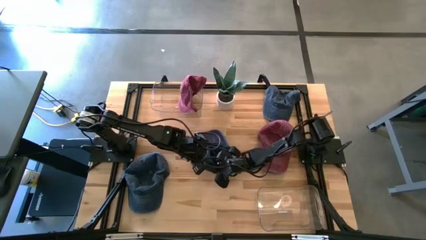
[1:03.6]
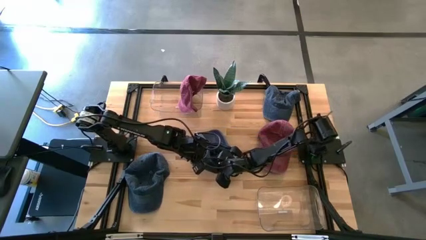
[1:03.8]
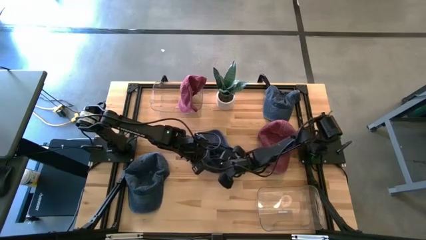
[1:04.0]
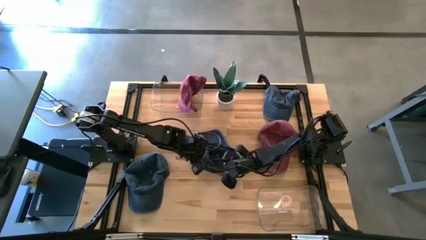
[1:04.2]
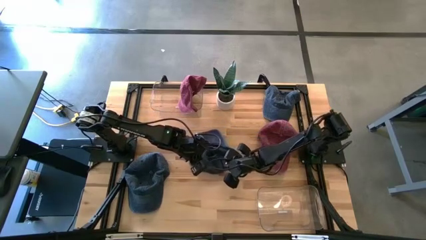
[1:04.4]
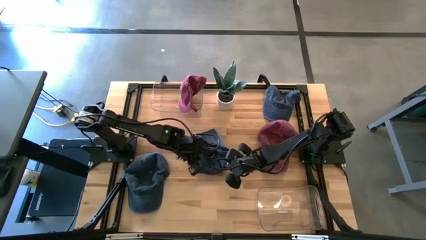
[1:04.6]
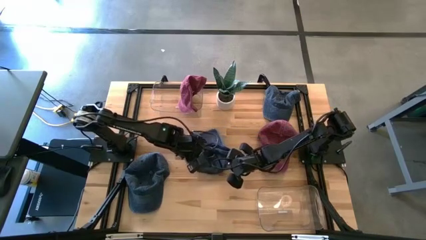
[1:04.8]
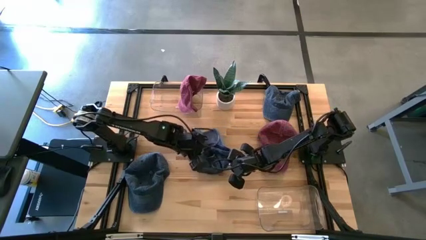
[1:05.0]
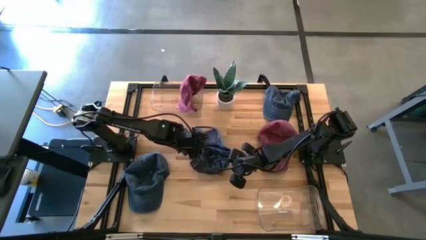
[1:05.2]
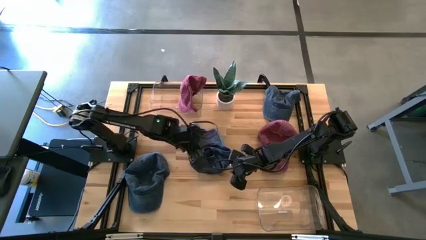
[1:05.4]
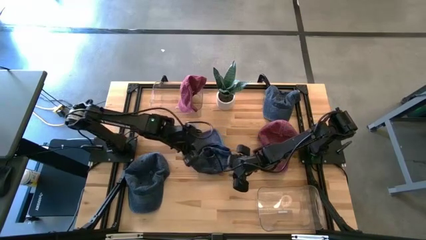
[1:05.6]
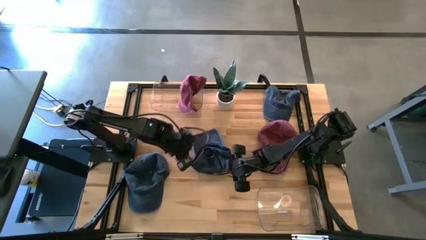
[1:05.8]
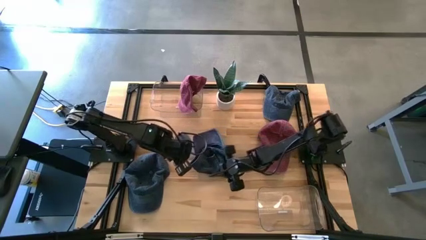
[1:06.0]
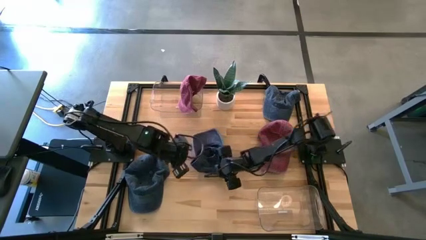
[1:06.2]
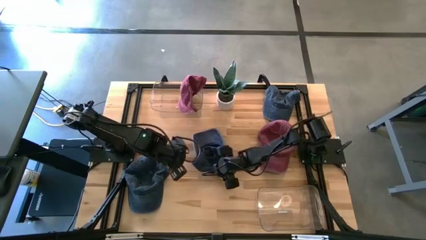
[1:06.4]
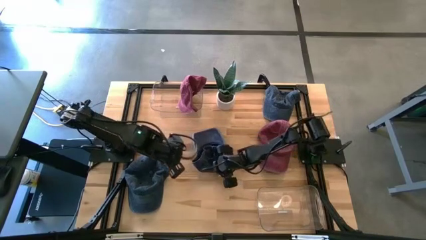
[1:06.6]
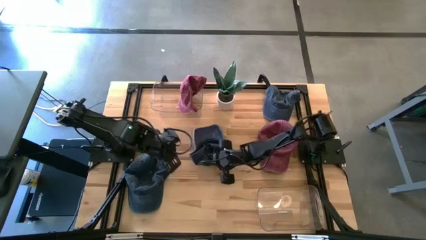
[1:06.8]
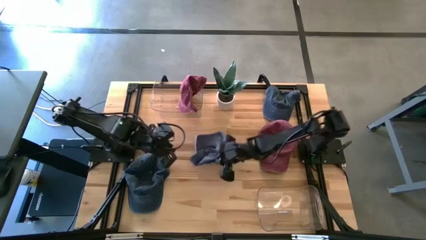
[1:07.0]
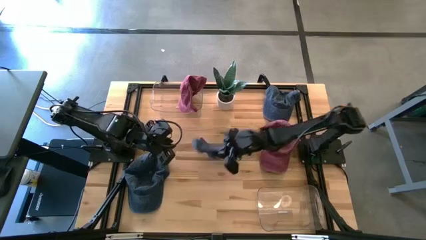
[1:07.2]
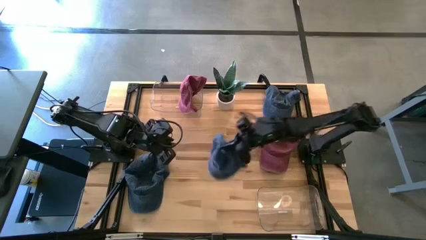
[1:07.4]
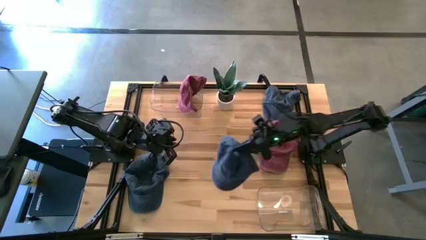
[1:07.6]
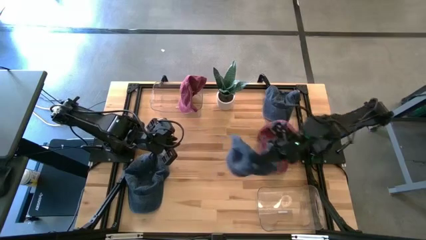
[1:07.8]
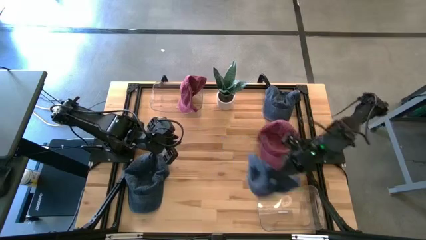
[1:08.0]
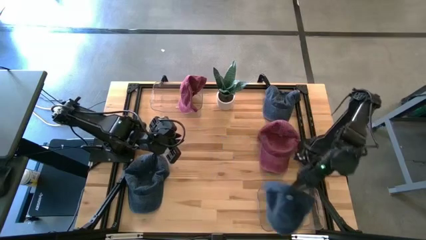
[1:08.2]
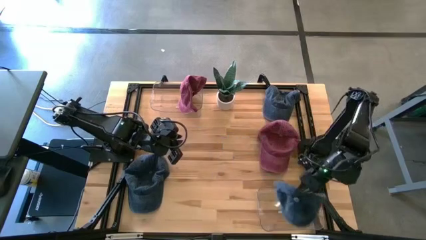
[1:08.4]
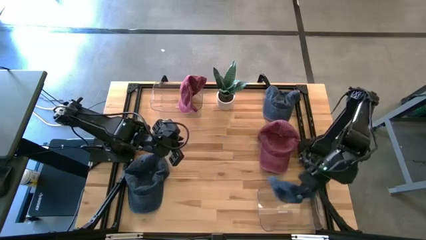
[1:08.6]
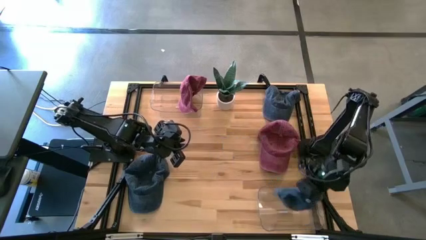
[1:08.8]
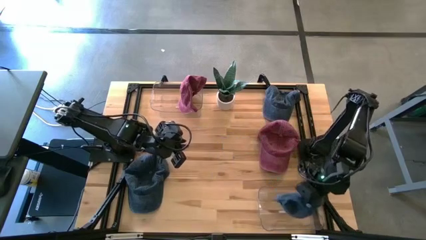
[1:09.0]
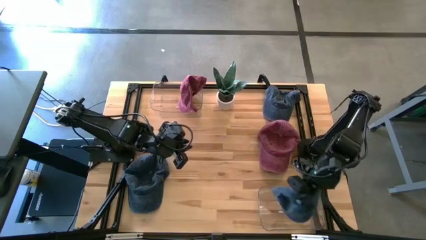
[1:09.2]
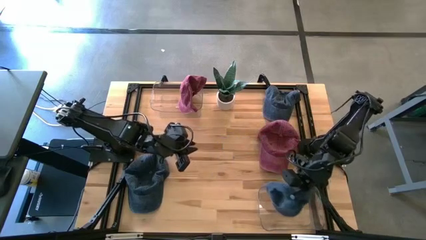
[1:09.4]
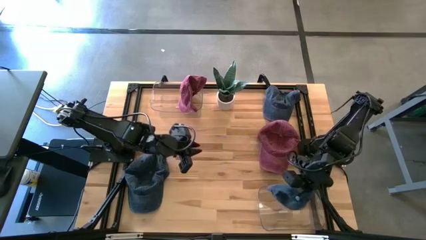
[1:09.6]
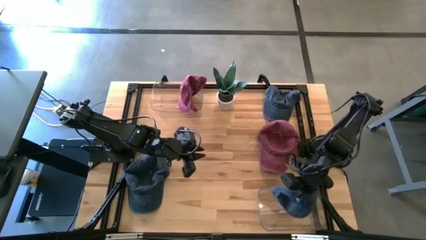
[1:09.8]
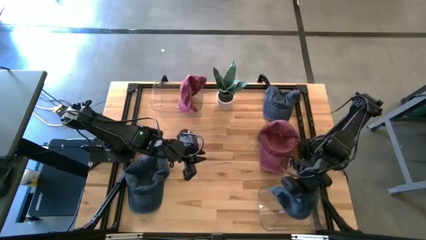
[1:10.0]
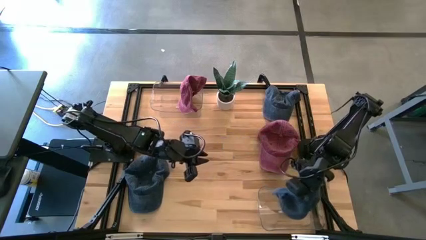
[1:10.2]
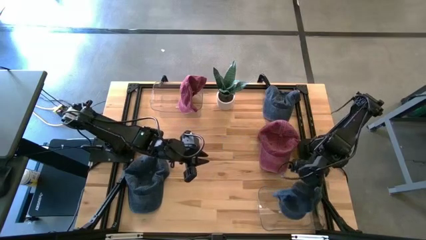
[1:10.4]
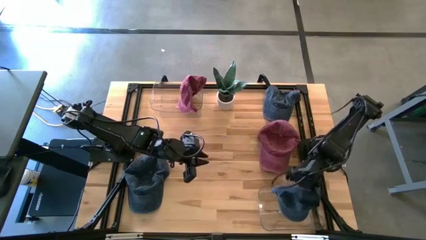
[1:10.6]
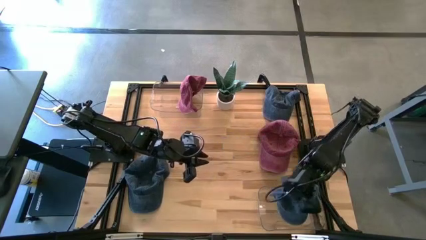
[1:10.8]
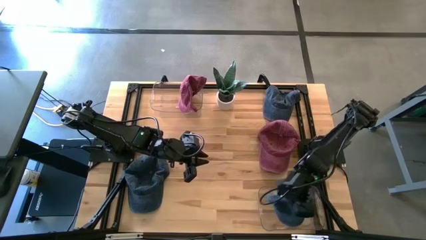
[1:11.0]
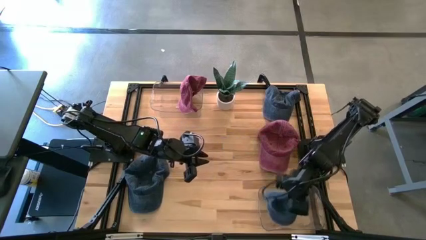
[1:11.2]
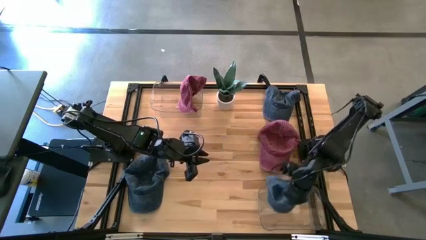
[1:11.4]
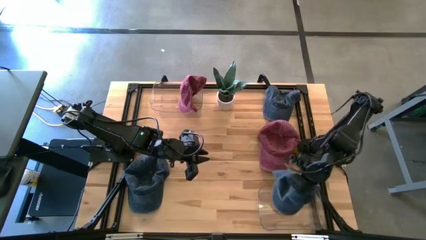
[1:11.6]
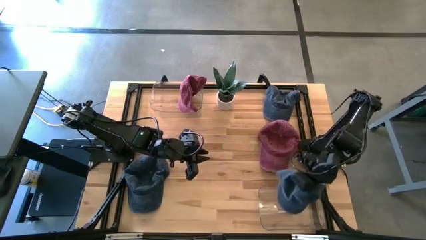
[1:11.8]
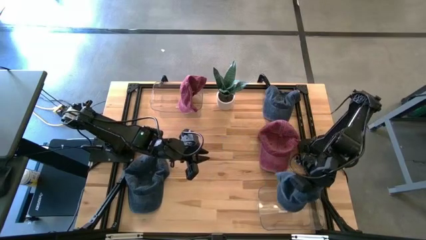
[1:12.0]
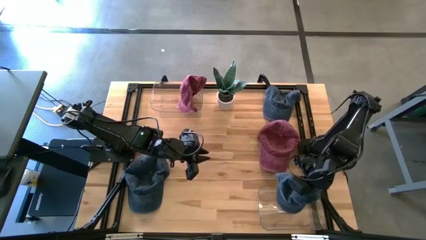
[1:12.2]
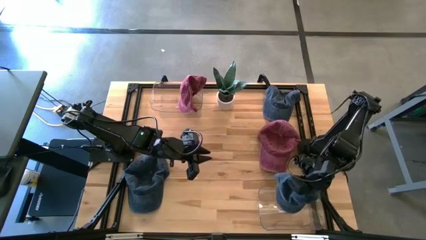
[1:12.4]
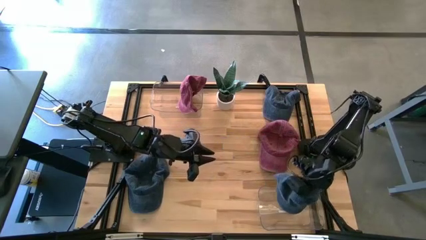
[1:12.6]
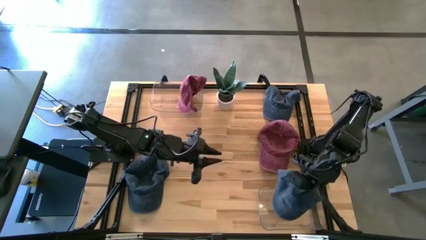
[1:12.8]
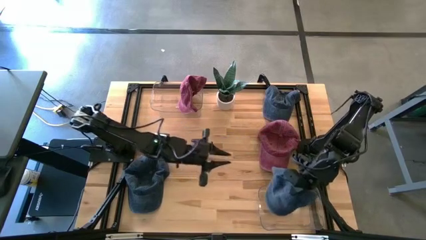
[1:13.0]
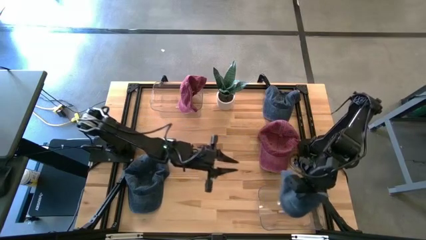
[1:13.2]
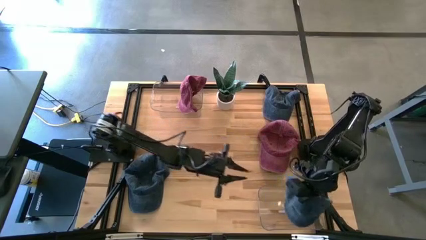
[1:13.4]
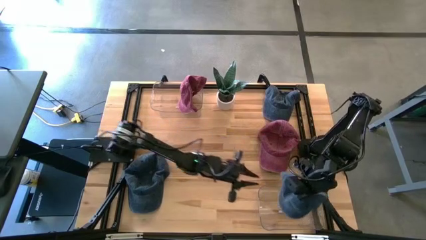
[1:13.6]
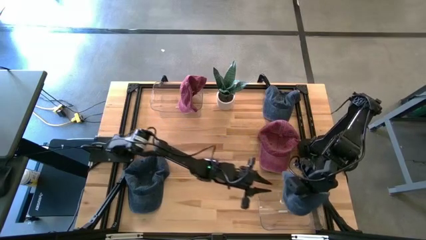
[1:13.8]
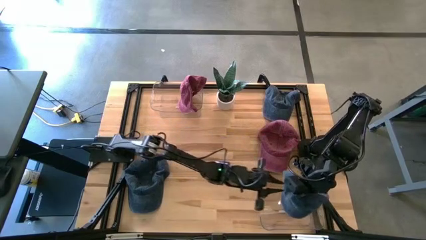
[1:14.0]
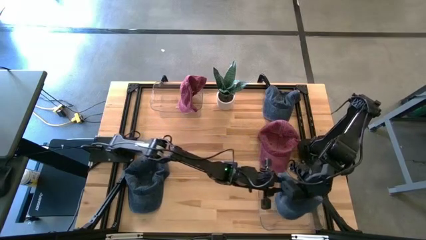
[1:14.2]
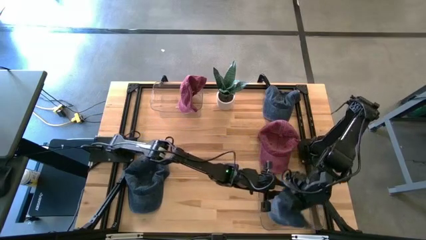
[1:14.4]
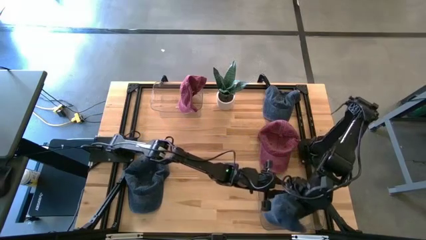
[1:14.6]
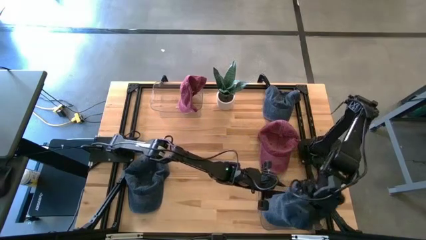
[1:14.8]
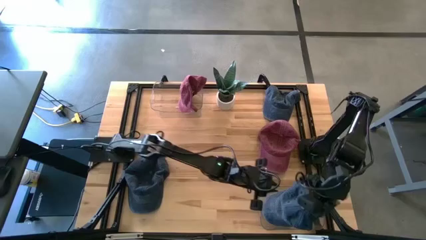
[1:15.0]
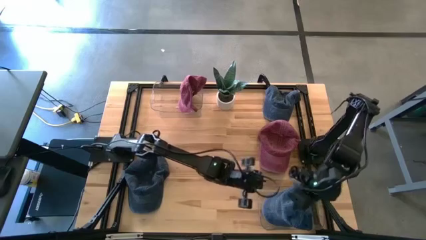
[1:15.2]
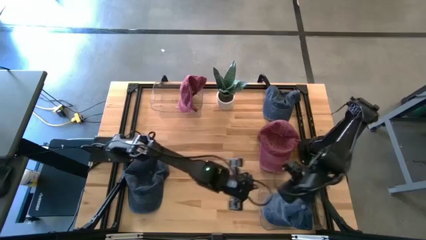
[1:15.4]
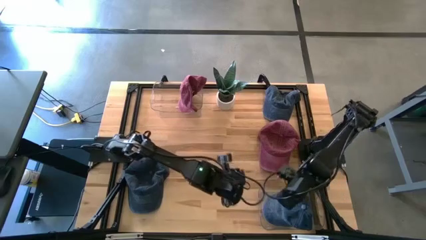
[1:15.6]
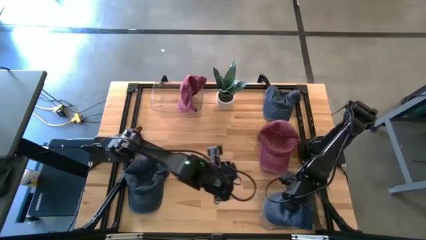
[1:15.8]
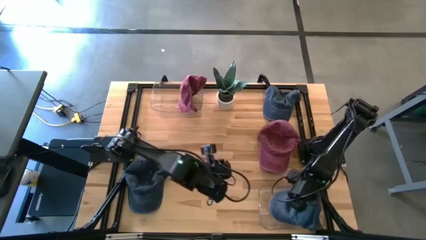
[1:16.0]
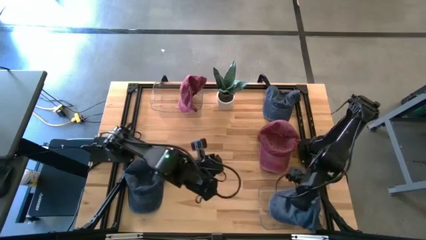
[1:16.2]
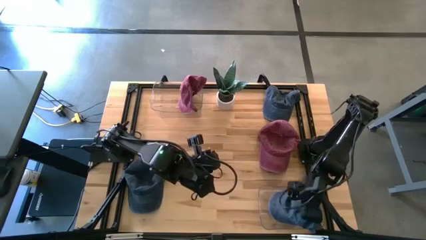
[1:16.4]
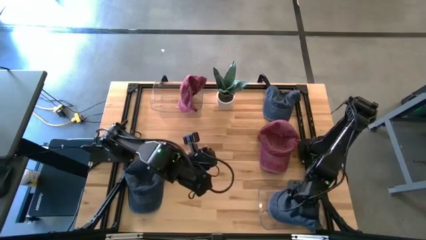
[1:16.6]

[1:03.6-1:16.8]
Task: Pick & Place hat
Put the middle blue cap into the bottom transparent bin

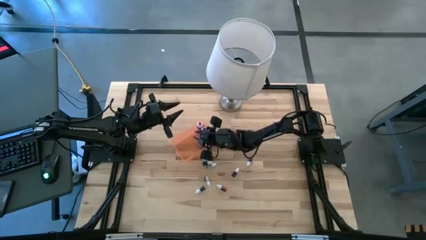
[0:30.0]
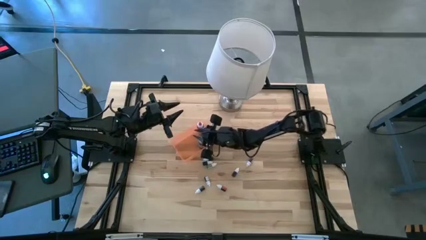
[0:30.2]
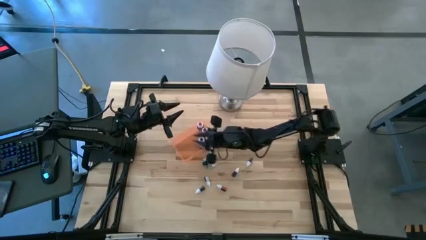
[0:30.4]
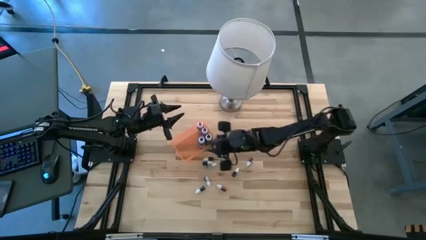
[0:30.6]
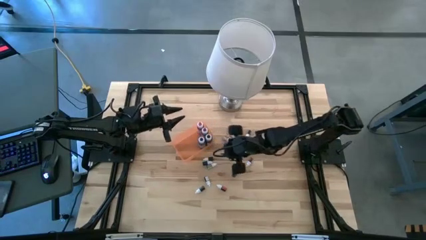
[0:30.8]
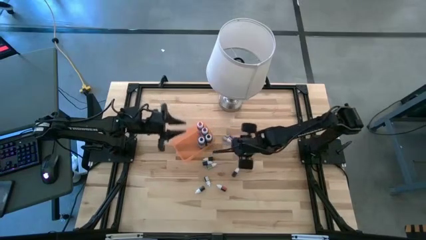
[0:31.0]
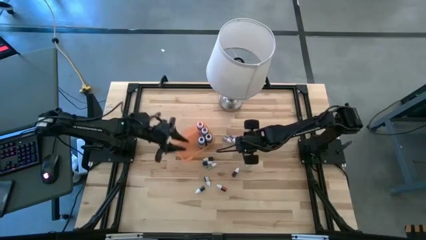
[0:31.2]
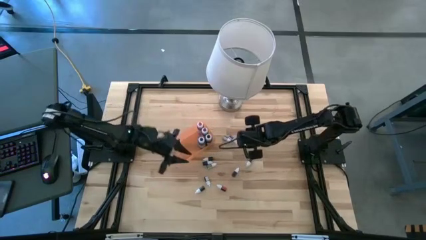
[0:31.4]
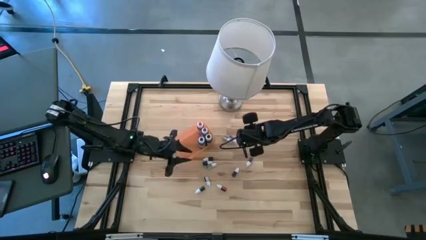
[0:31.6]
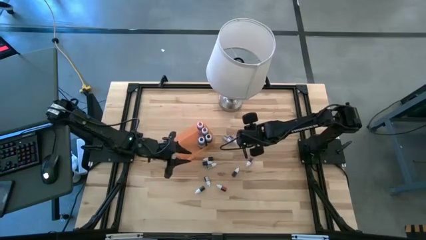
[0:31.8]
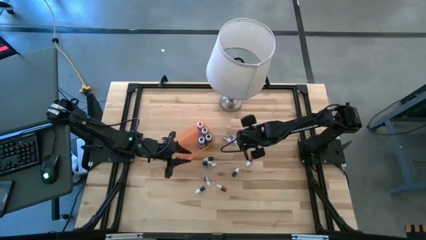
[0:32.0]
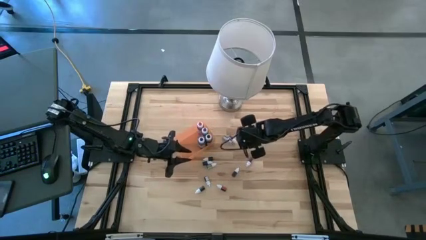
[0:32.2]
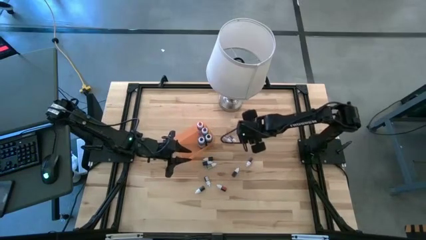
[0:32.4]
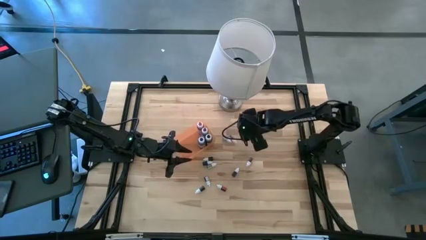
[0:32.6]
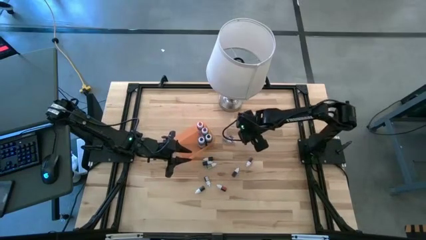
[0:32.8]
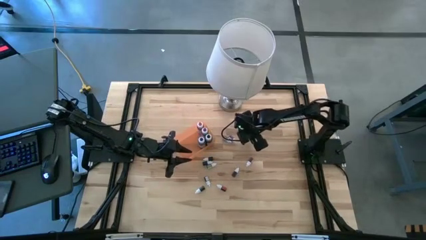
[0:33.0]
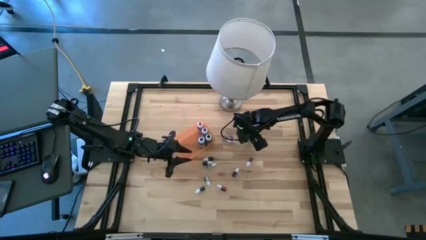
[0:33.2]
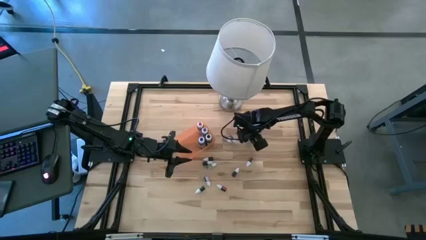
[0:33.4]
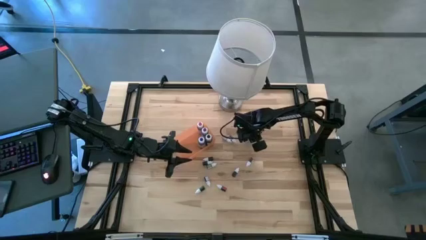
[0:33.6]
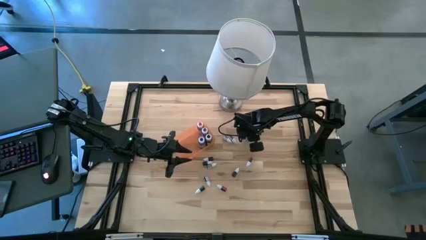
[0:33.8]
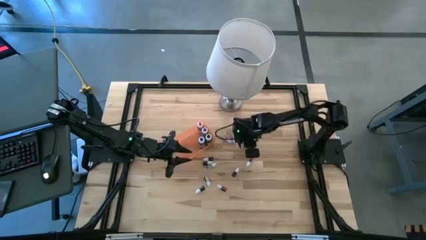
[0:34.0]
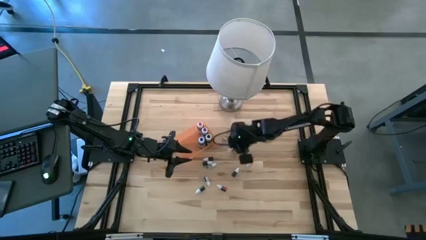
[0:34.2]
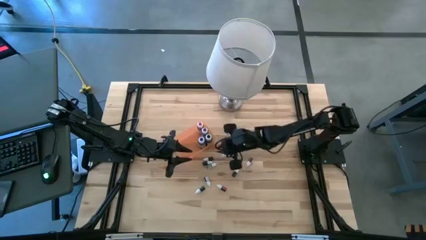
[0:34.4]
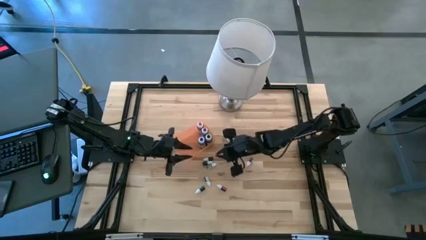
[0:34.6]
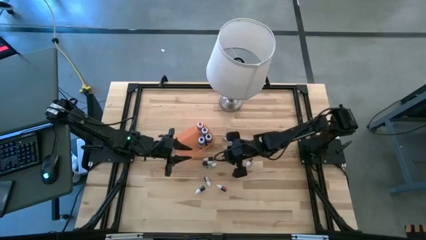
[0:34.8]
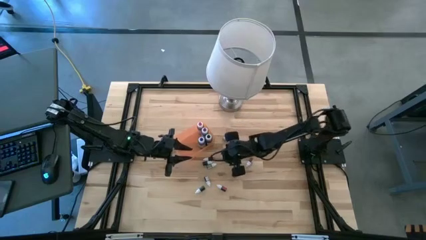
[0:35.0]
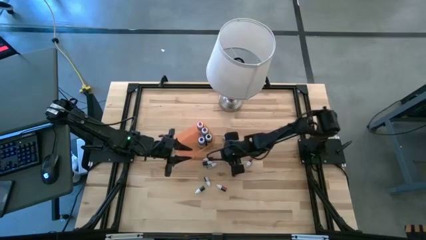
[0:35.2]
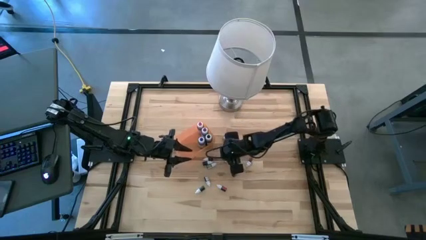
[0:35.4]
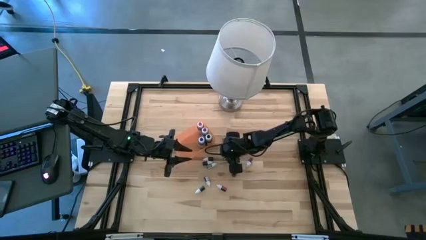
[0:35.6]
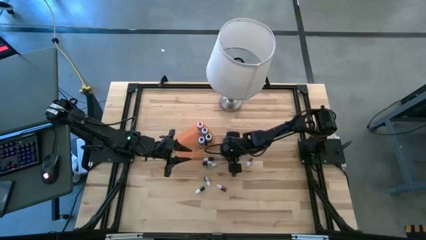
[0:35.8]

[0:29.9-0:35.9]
Task: Pick & Place food coloring
Put the top small black food coloring bottle into the bin
